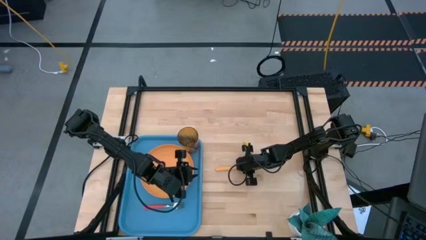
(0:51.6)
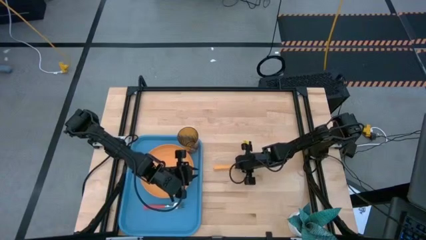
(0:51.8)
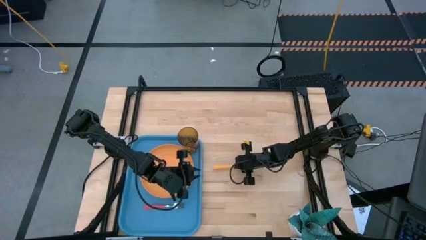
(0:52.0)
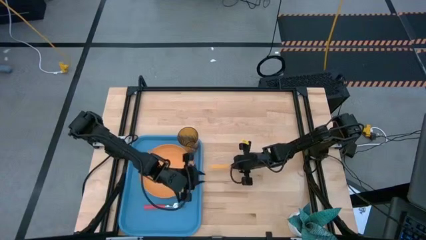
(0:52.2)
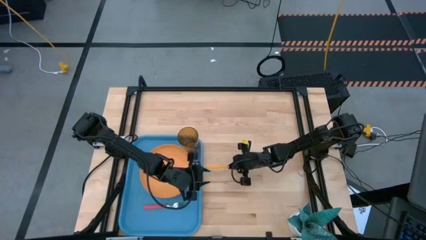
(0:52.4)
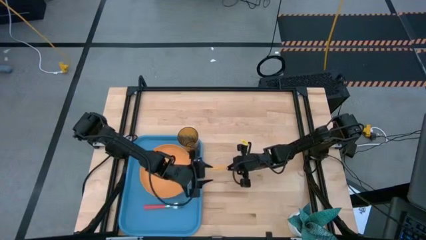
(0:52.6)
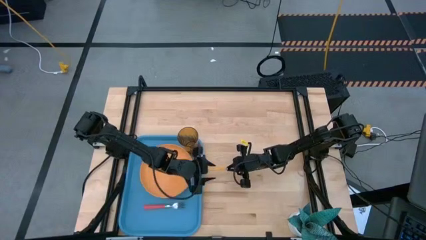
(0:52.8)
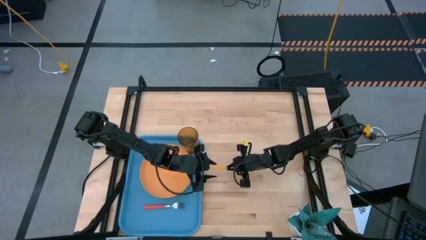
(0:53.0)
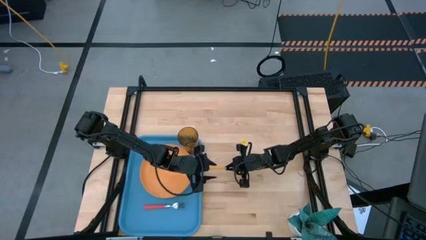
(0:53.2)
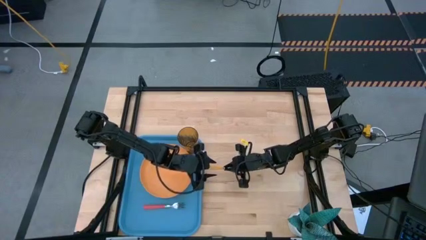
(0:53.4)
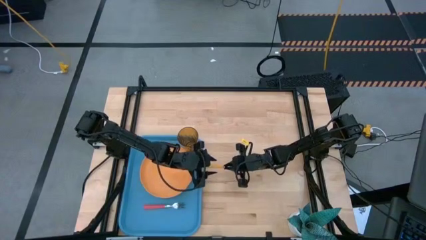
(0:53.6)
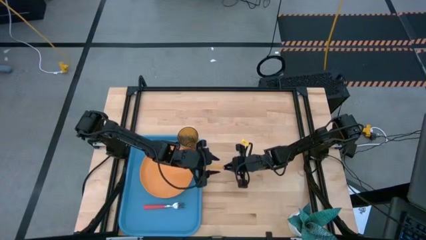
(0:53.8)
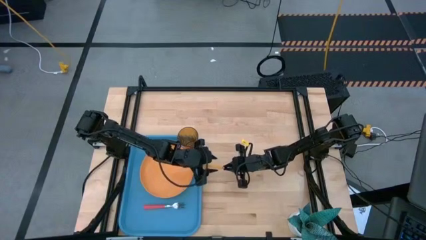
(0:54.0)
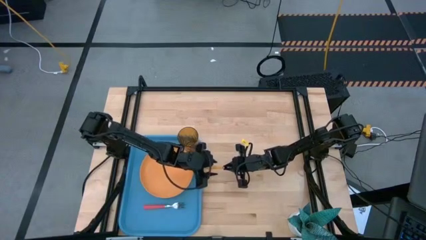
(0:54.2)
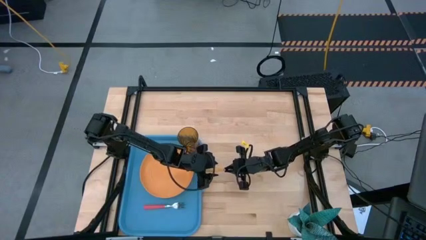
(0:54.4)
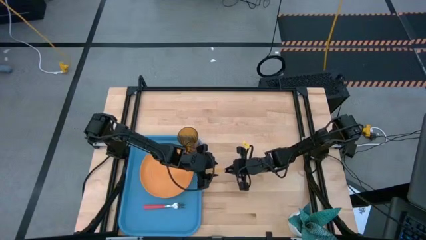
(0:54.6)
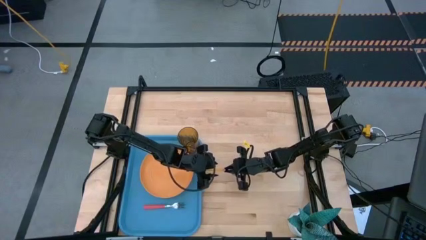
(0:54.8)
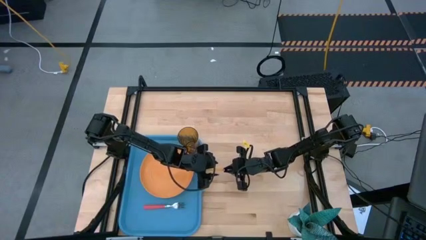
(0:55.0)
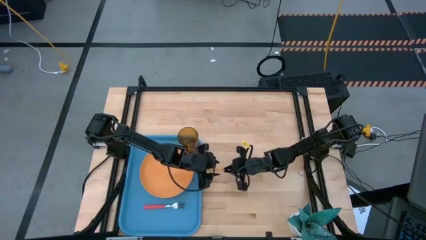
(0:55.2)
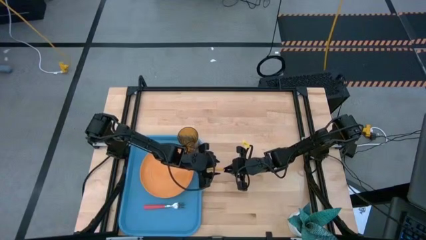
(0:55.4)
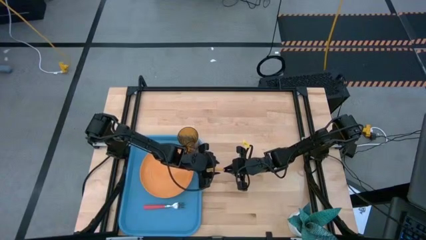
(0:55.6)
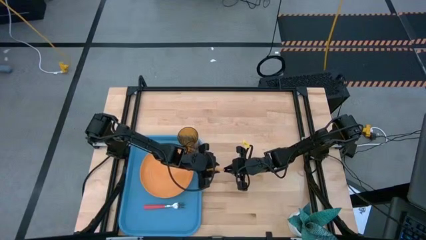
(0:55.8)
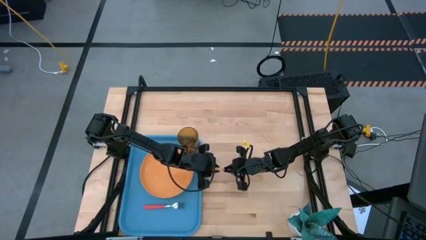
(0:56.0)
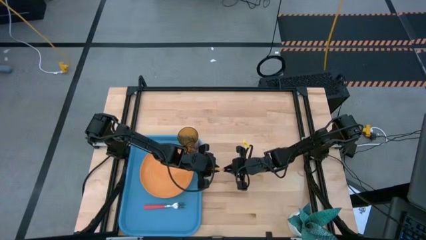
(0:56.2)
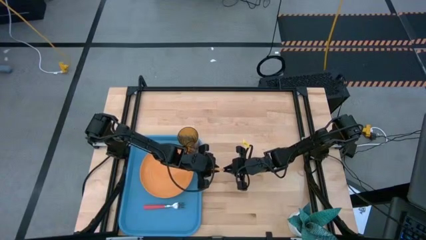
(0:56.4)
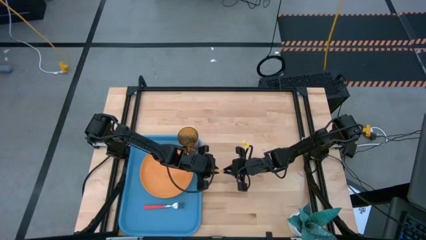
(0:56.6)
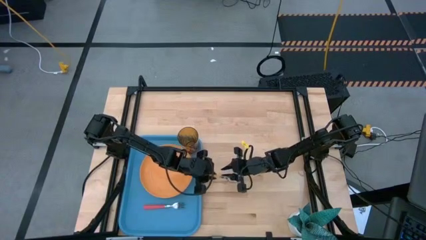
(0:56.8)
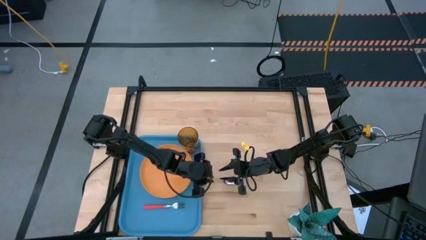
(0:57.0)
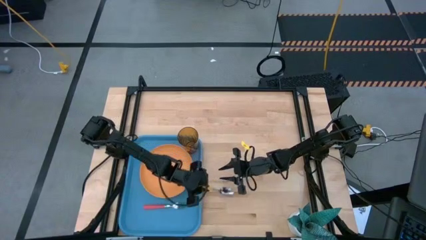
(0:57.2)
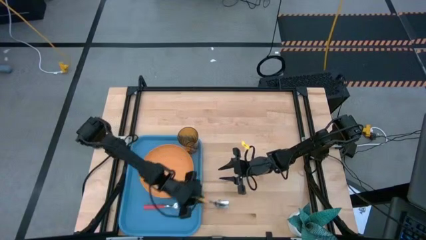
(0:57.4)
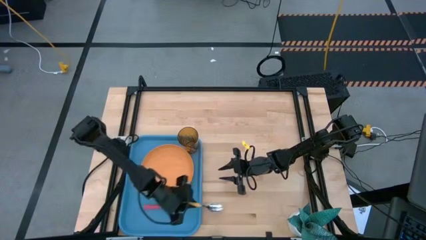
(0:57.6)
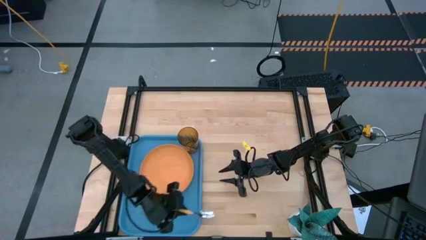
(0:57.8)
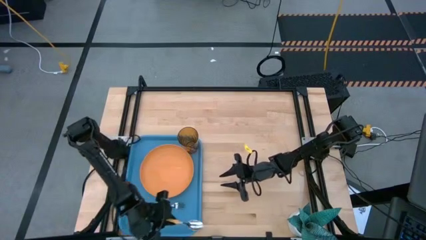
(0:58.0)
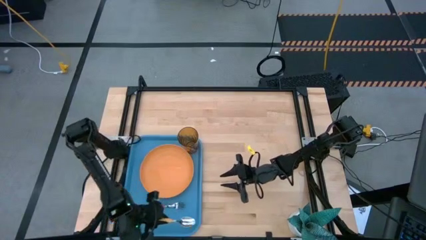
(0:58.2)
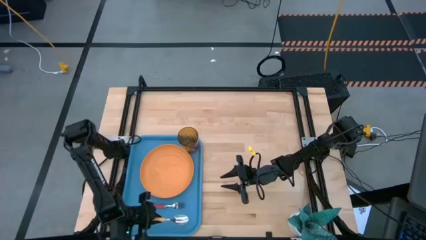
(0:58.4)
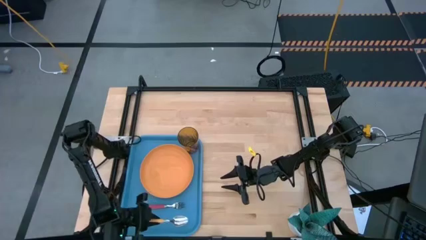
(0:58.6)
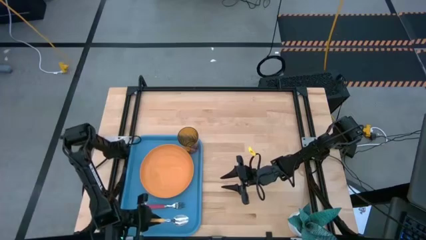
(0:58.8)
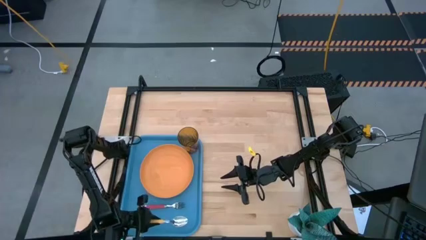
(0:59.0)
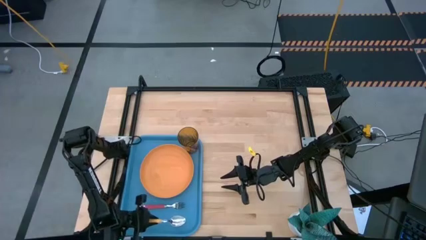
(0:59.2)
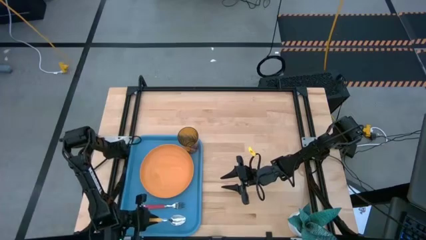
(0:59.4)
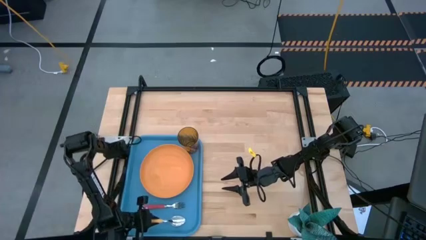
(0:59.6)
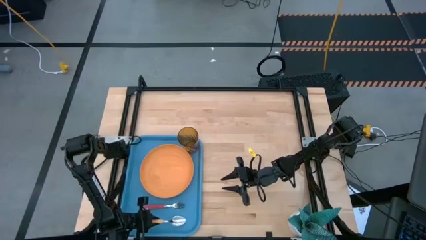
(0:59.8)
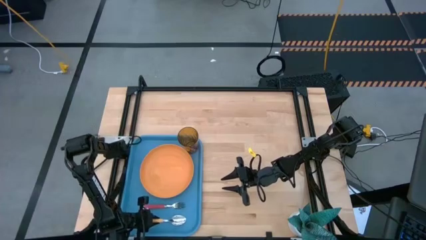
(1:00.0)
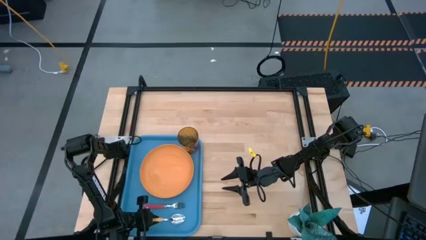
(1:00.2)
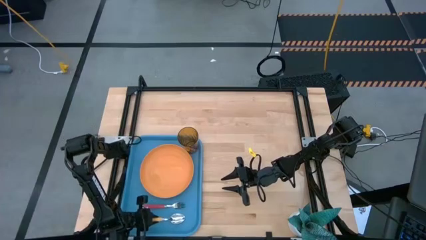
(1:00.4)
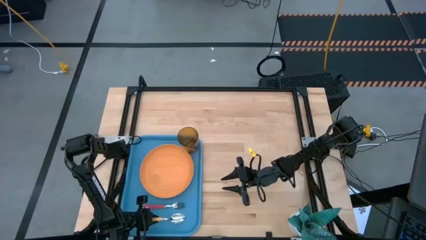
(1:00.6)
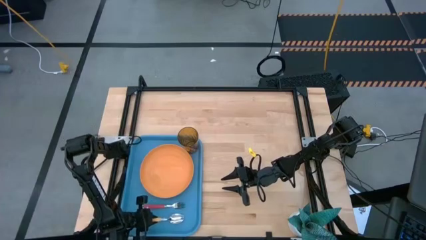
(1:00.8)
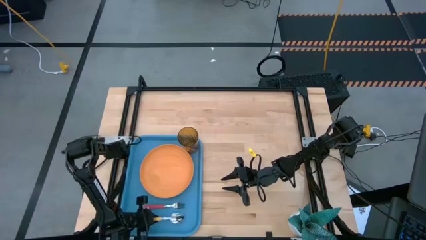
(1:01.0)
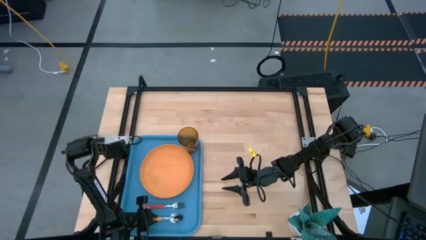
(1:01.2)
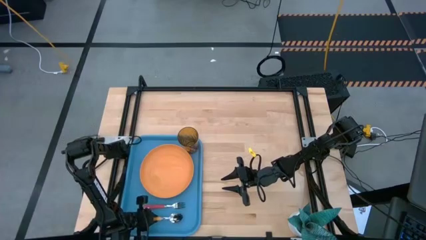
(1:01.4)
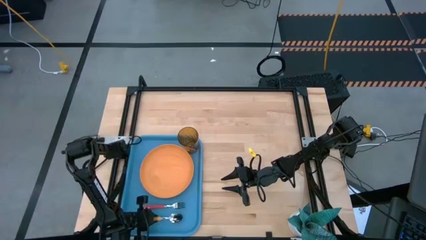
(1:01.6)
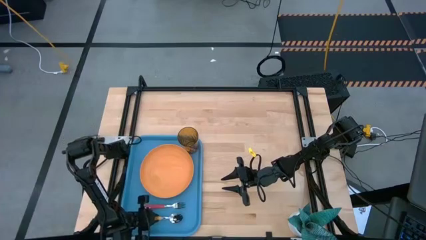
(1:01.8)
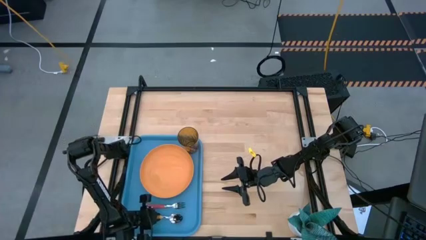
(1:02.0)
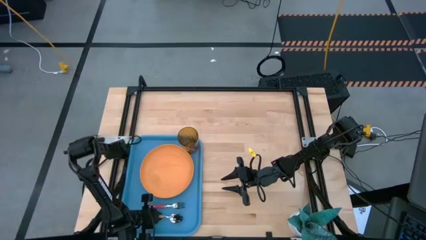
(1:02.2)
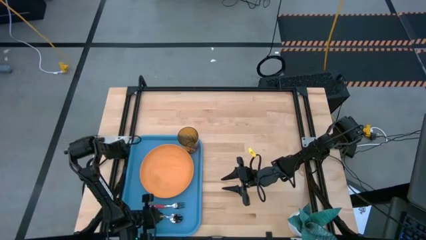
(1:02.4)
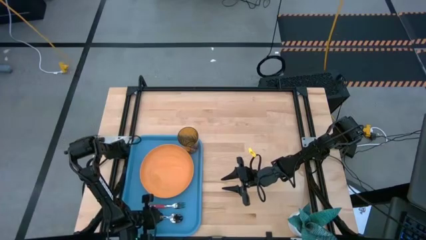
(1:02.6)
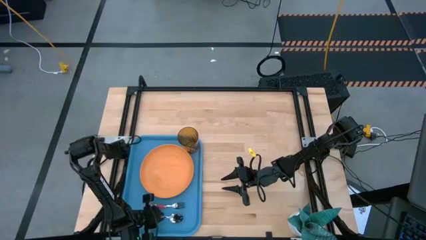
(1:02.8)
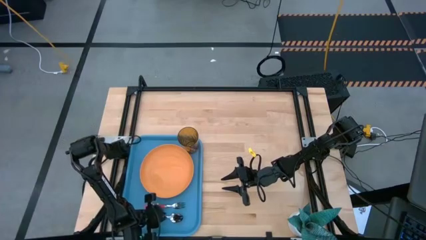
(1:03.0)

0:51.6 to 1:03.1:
Task: Pick and place plate/cup/fork/spoon on tray
Put the yellow spoon on the blue tray
